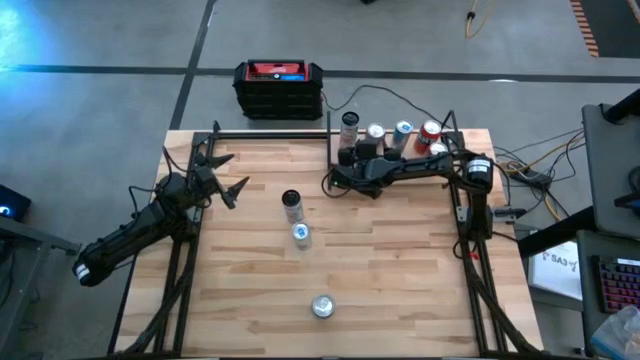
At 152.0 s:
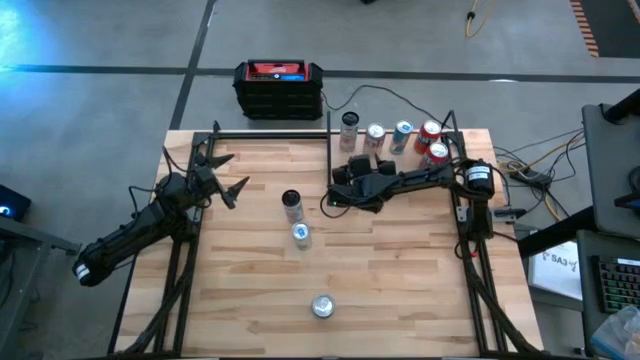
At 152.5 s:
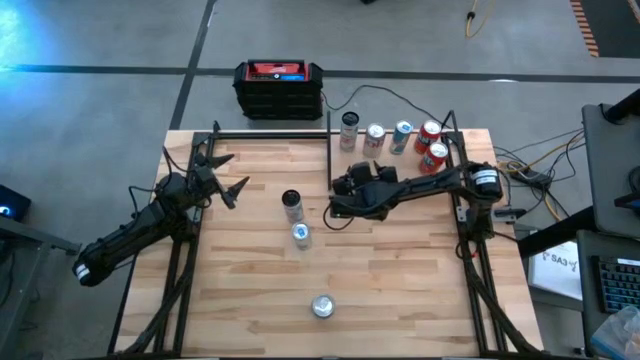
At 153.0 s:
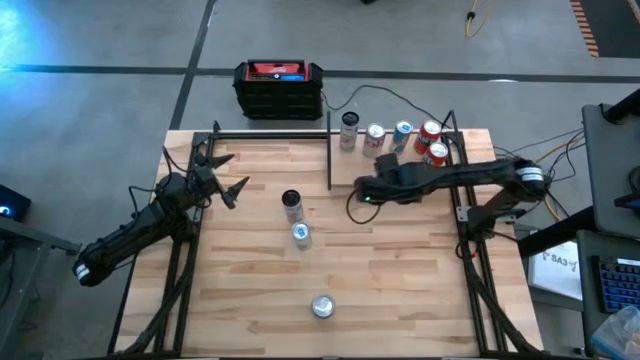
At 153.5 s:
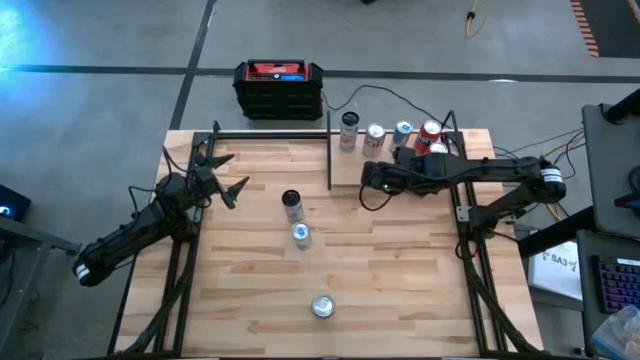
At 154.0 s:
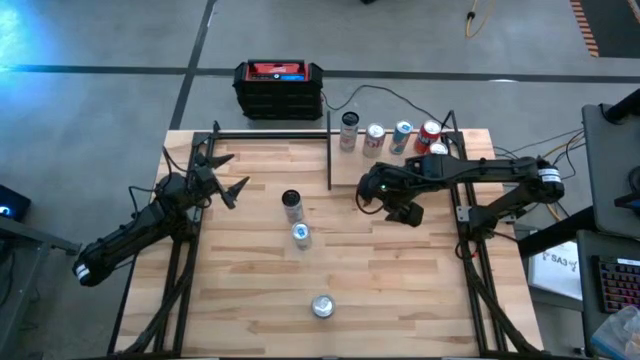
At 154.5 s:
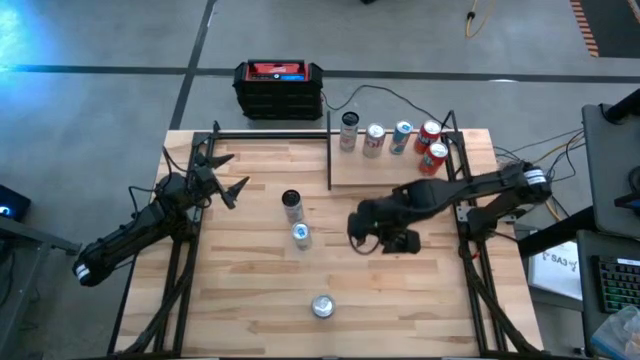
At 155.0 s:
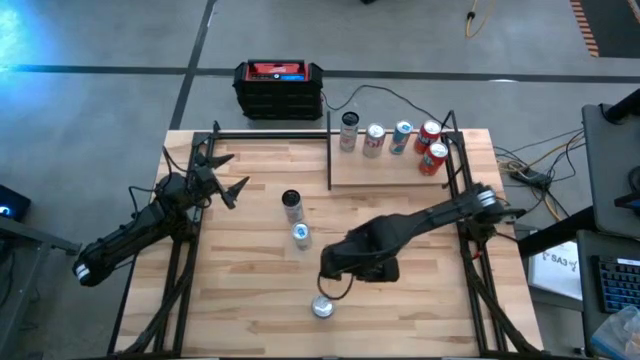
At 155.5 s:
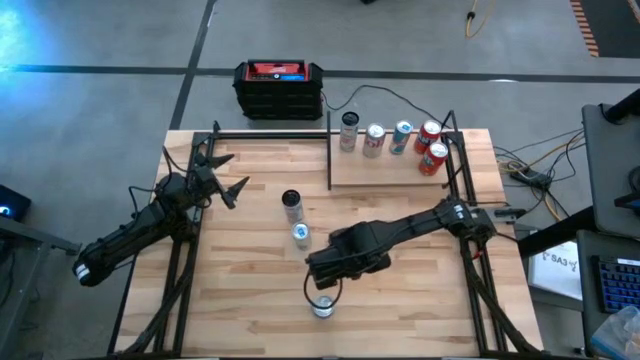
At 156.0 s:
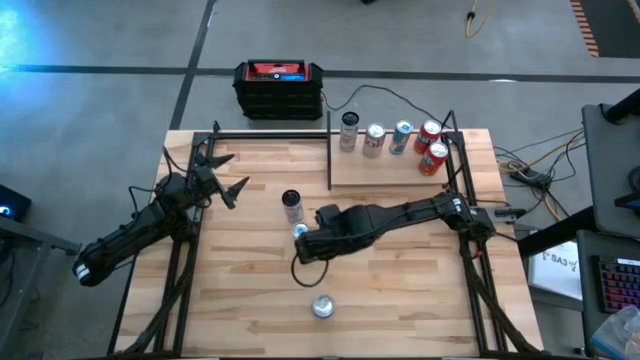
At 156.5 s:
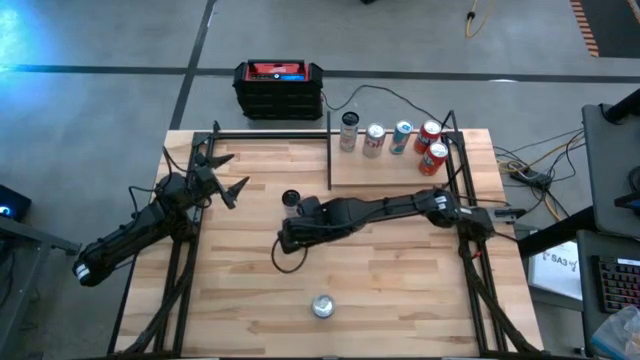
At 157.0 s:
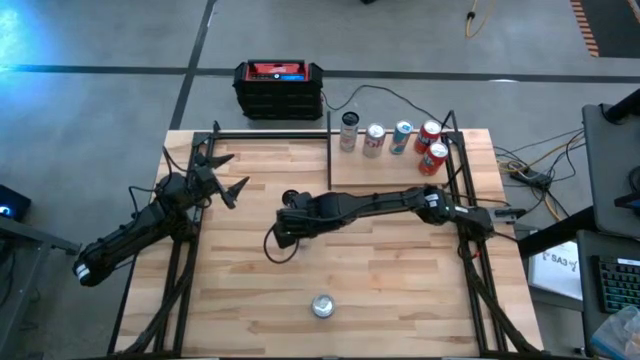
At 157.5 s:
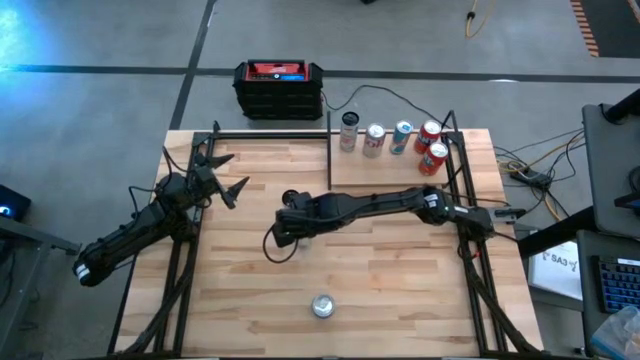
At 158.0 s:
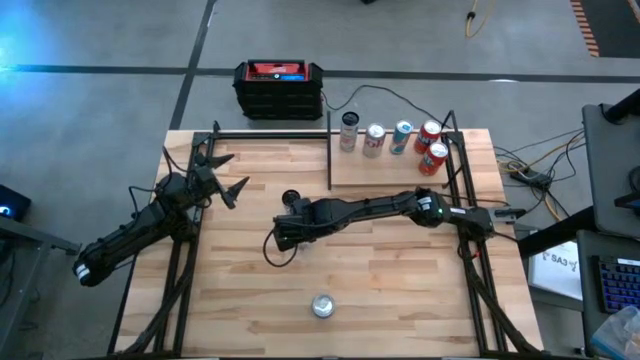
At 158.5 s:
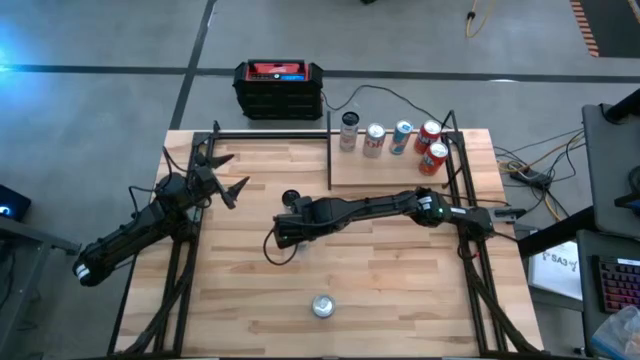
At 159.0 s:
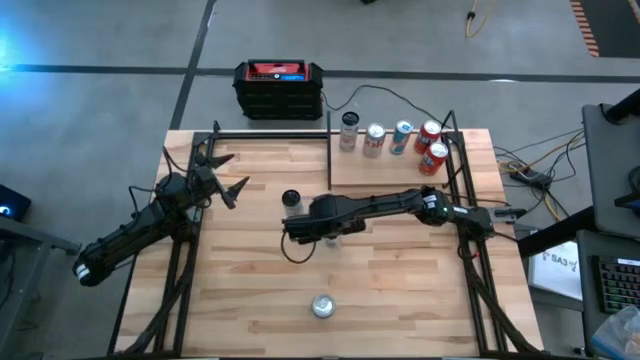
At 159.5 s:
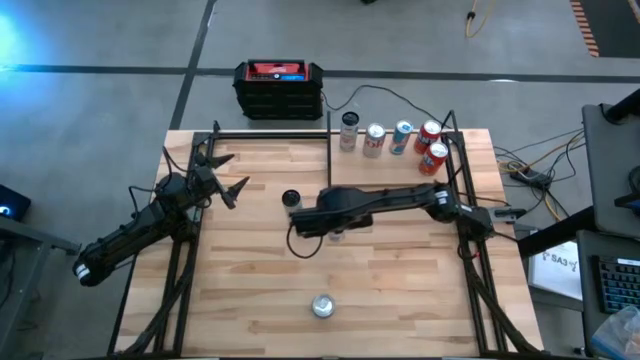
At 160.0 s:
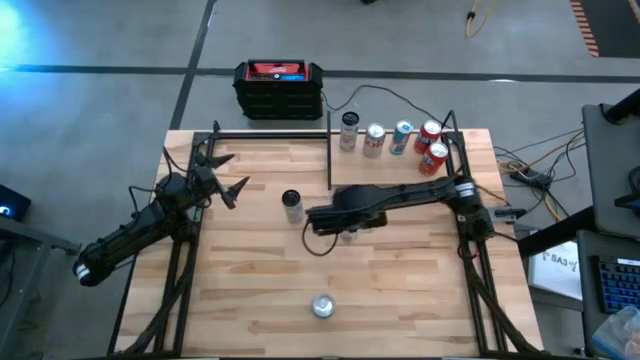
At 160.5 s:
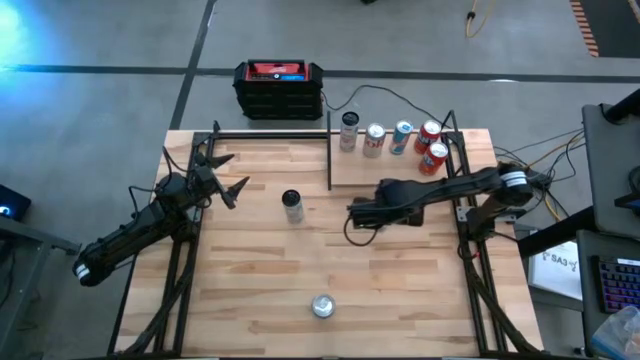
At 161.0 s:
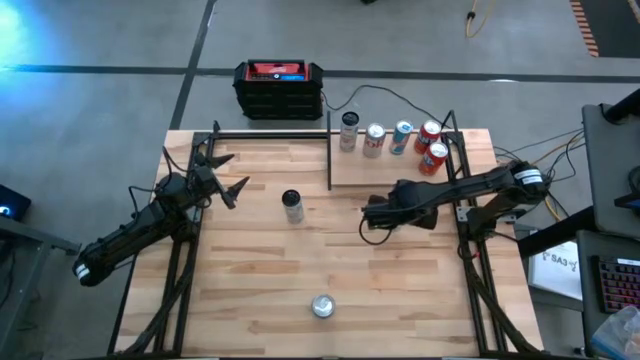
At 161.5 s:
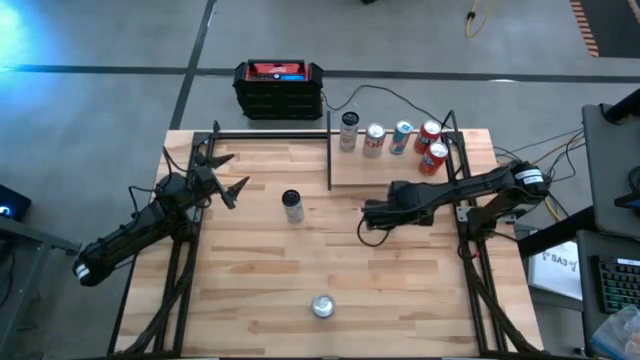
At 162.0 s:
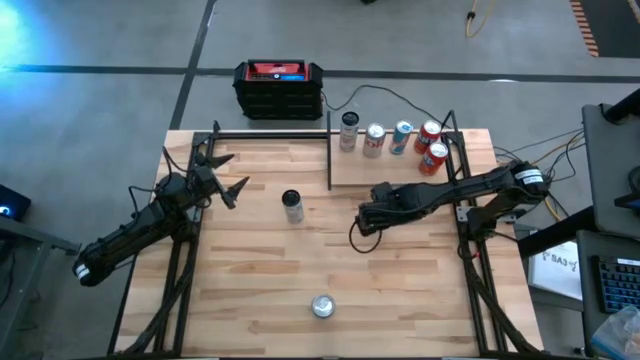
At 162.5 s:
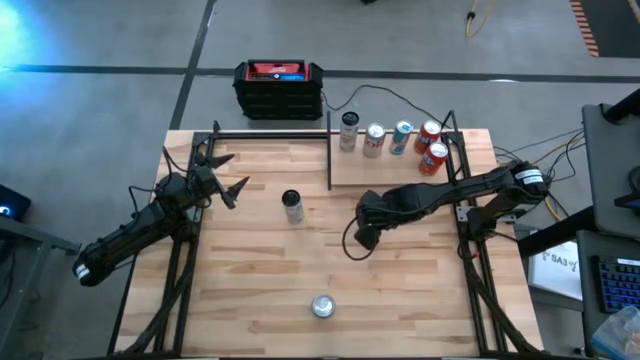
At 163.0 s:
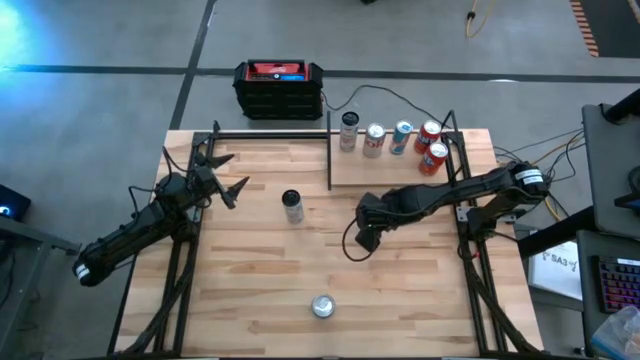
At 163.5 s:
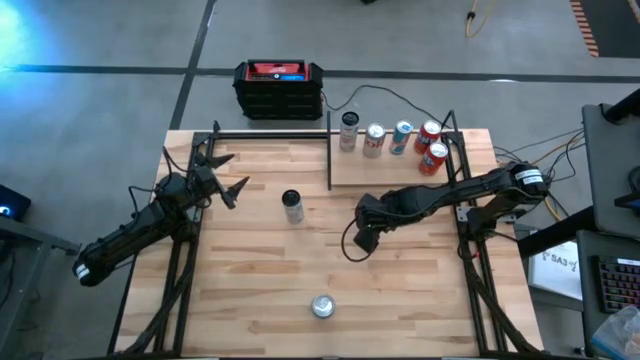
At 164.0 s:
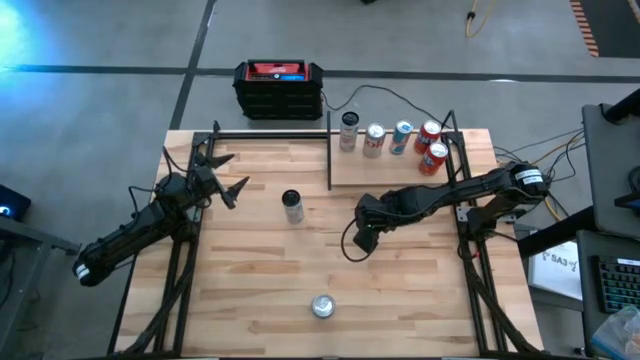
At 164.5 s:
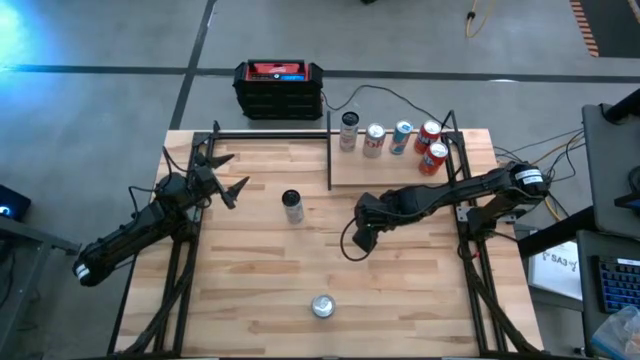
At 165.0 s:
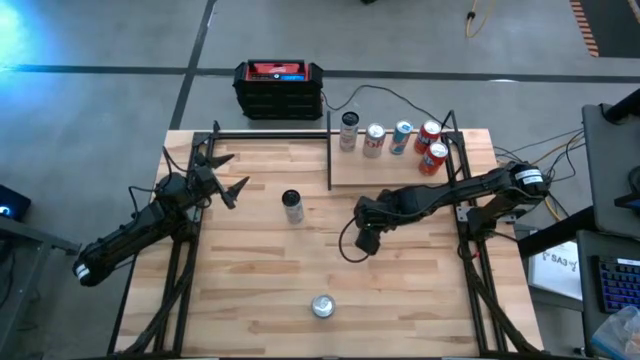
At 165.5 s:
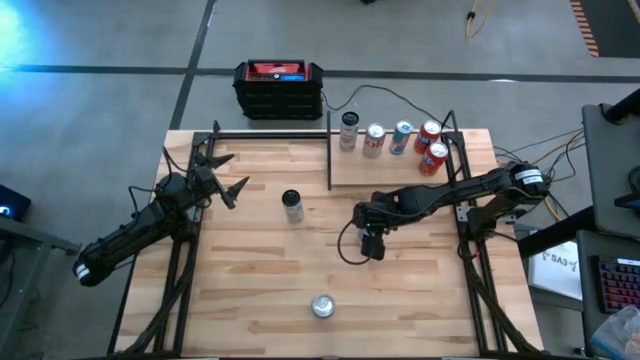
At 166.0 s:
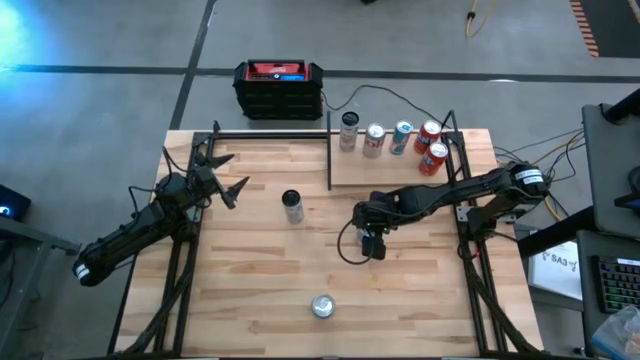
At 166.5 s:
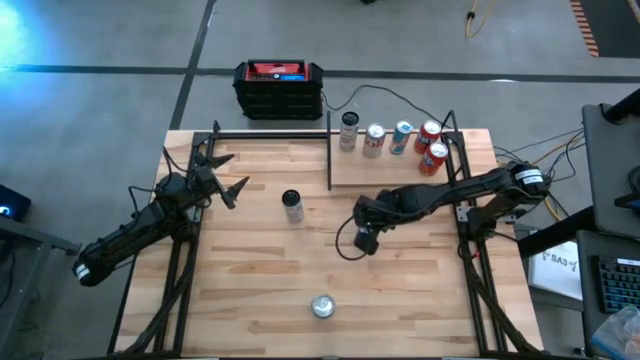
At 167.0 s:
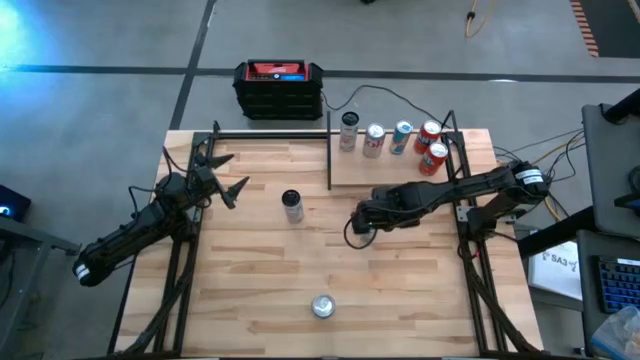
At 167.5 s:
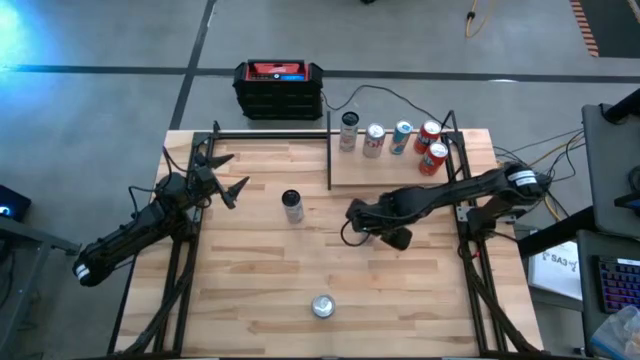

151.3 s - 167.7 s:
Task: Place canned beverage on shelf
Put the blue soda can on the shelf aligned with the other blue soda can

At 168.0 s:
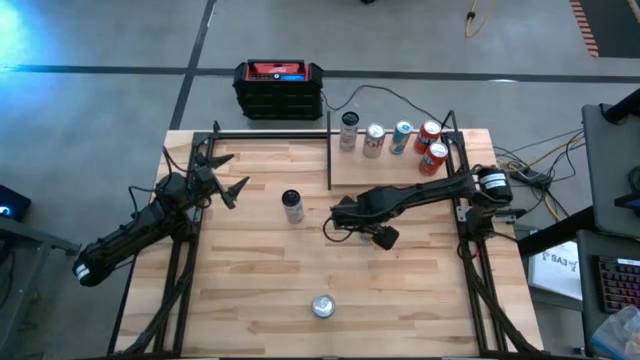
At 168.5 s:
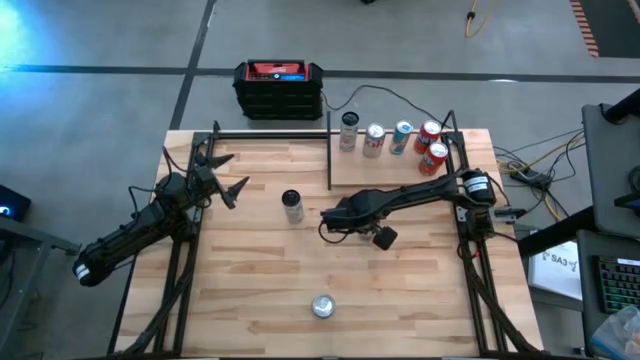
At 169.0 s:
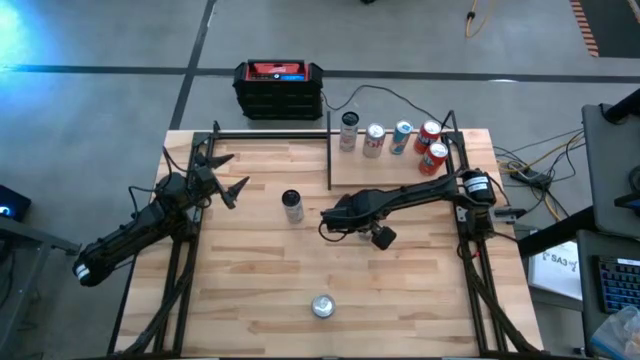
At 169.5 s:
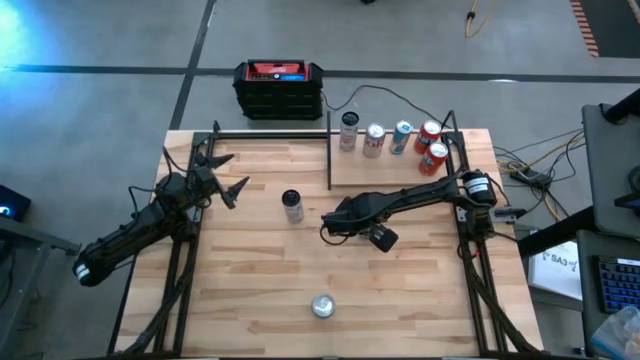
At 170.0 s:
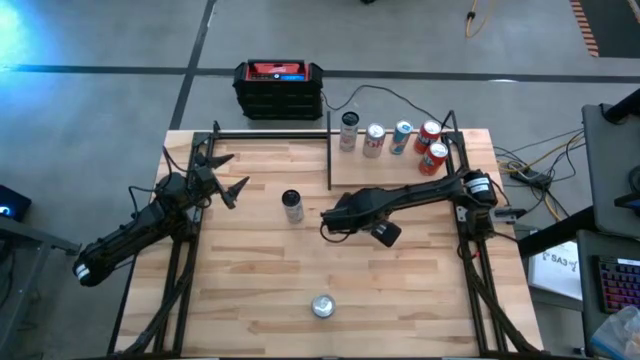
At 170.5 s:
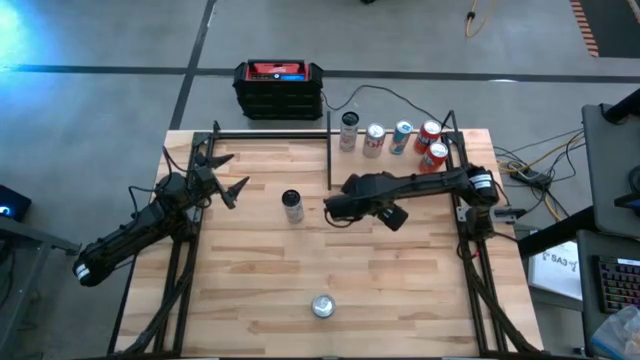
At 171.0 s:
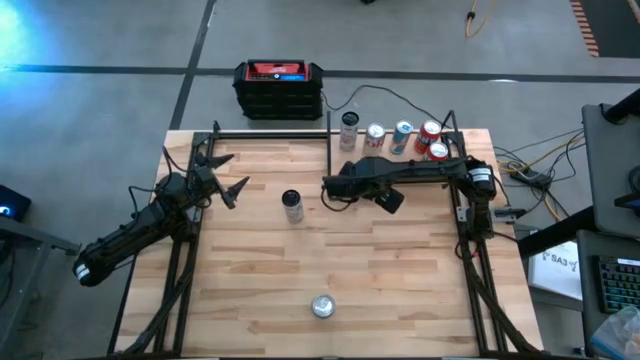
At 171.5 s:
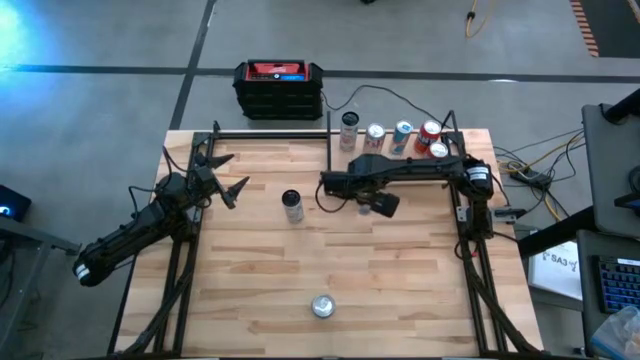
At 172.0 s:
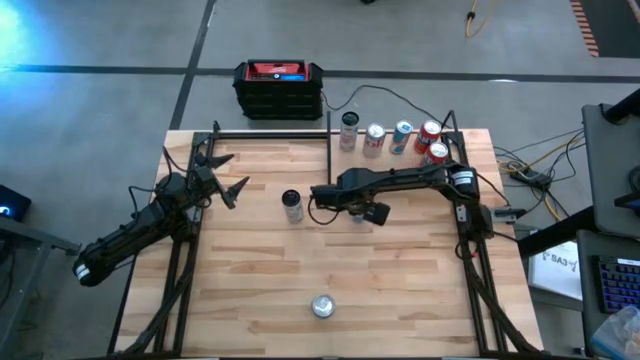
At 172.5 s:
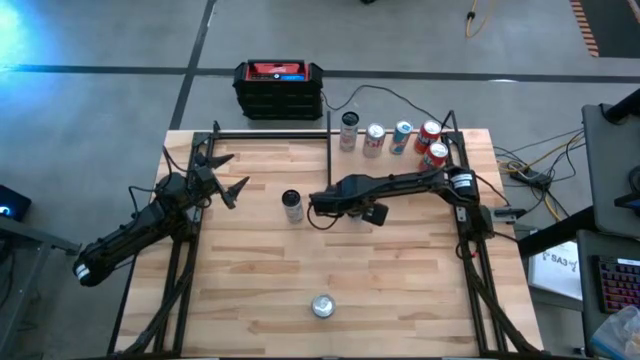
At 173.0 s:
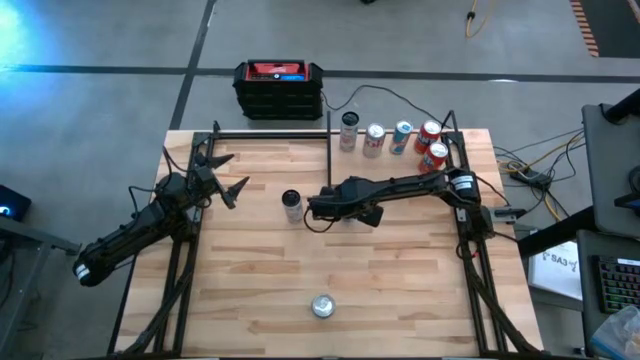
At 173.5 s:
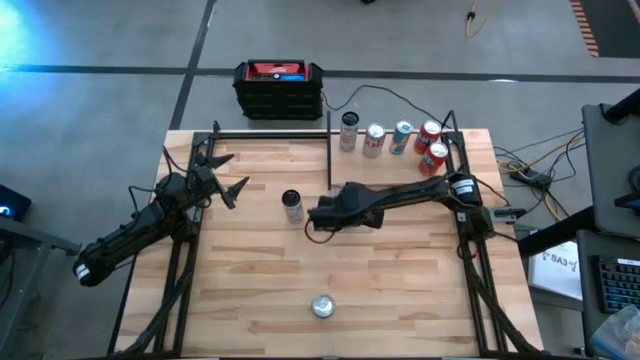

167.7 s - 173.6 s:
Put the blue soda can on the shelf aligned with the other blue soda can
